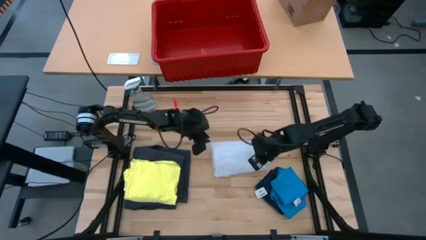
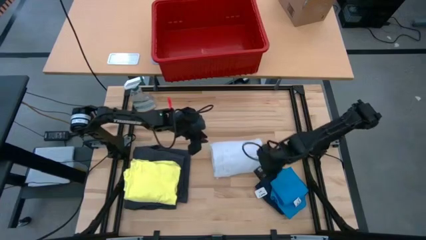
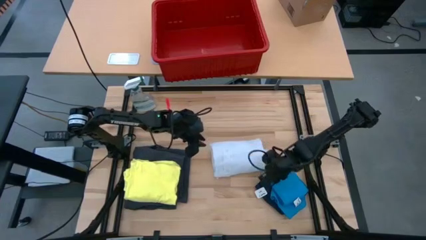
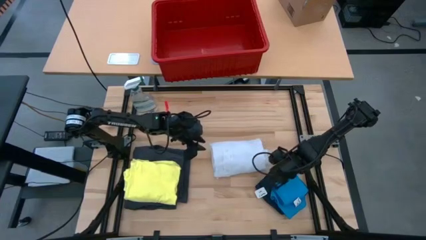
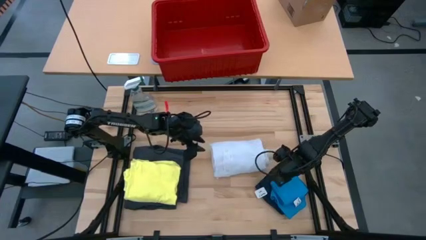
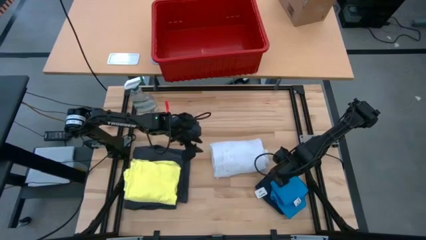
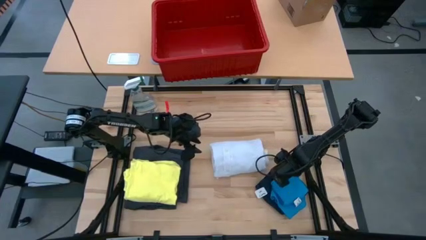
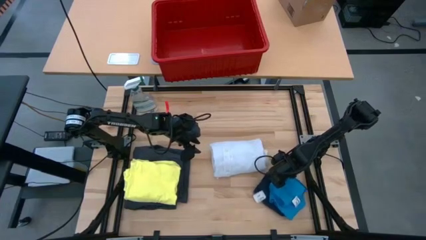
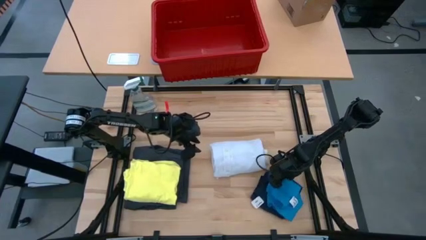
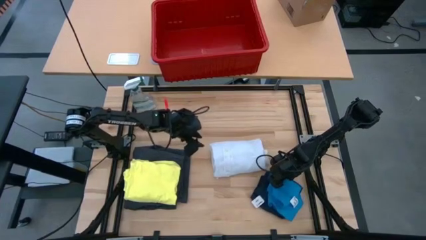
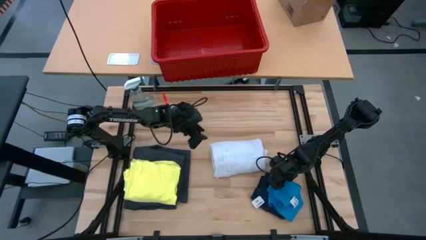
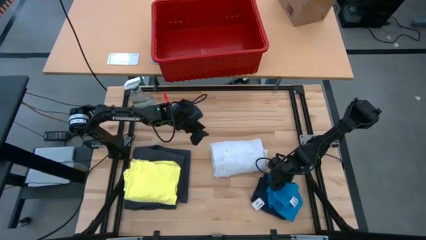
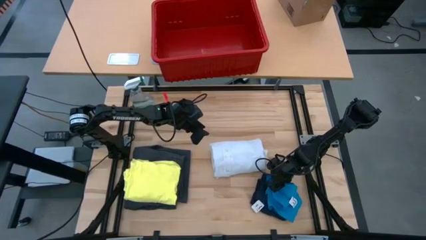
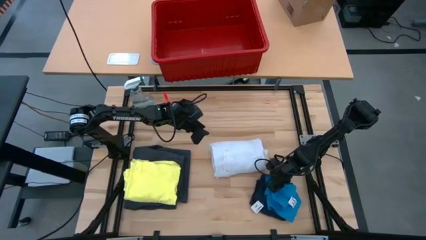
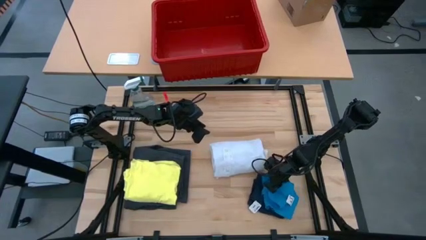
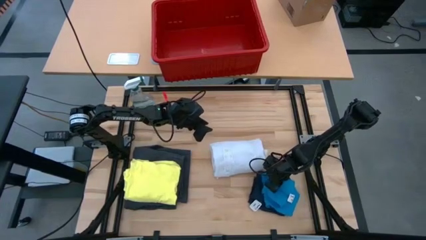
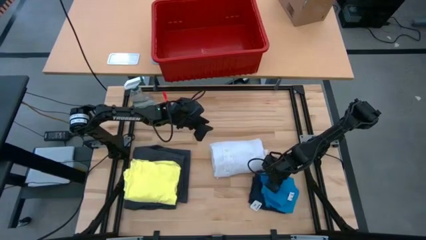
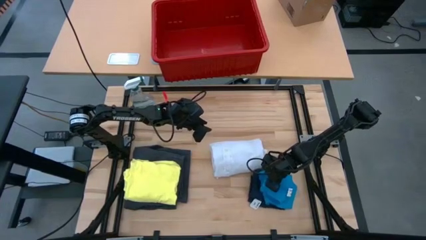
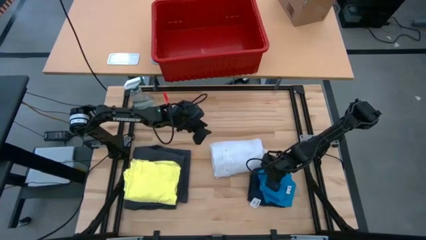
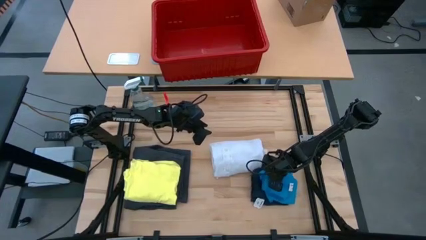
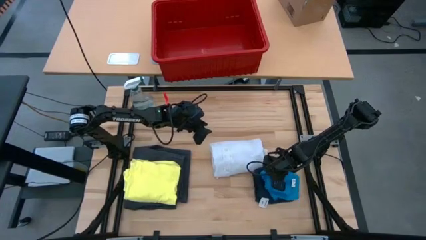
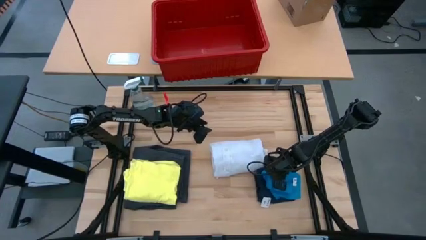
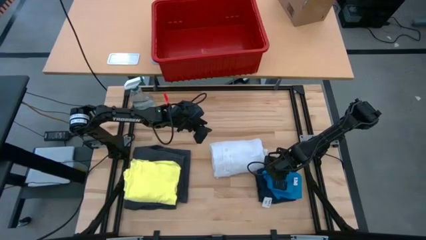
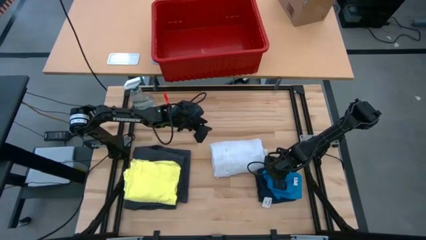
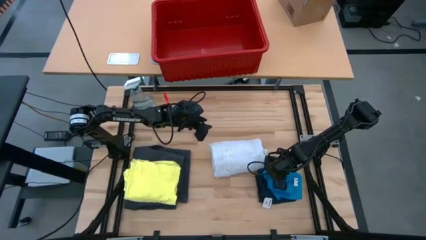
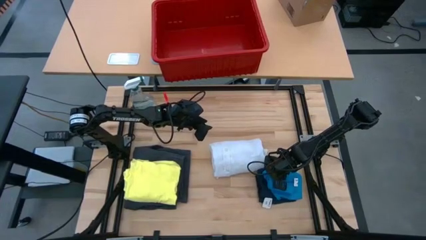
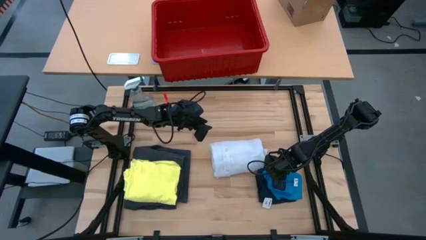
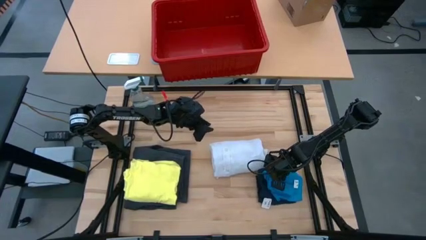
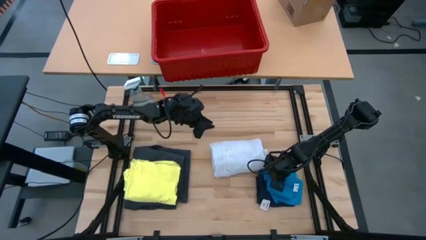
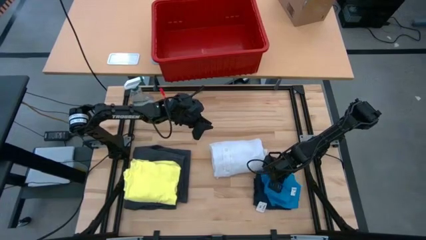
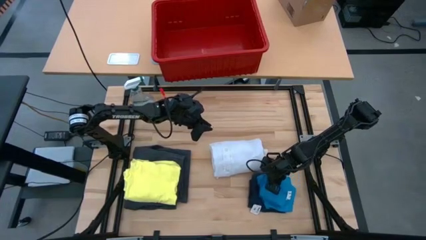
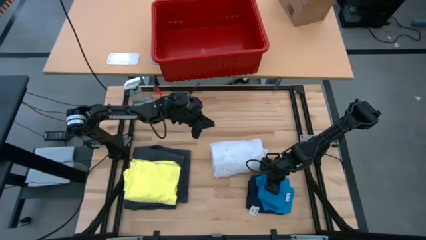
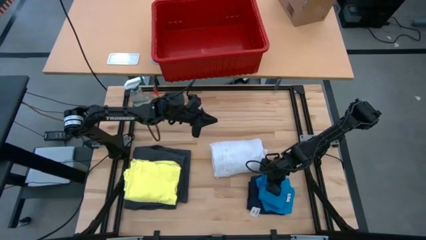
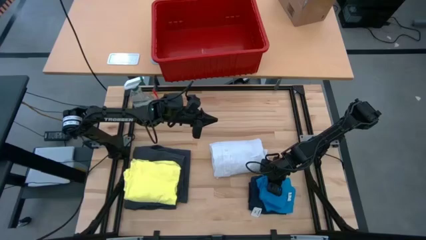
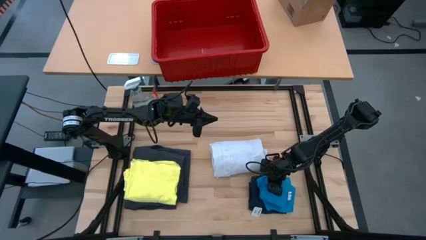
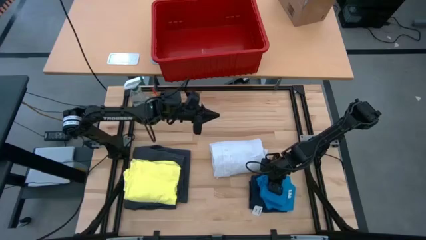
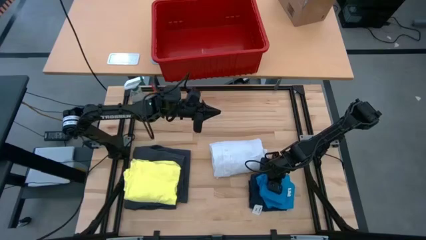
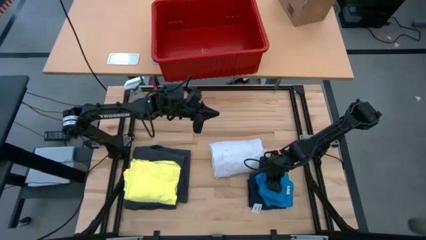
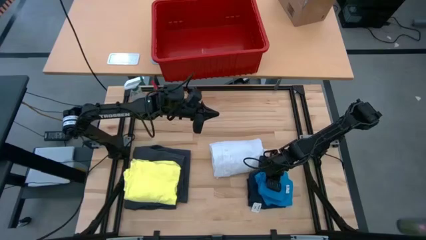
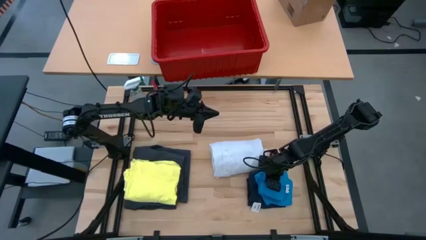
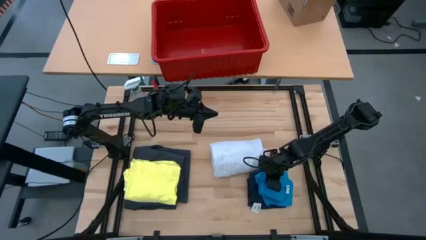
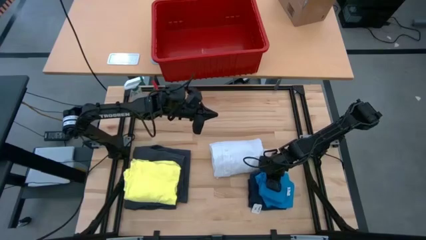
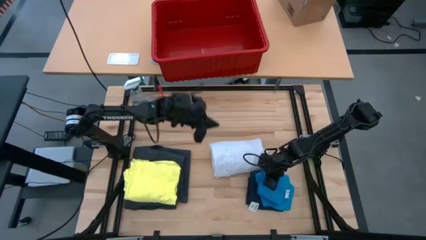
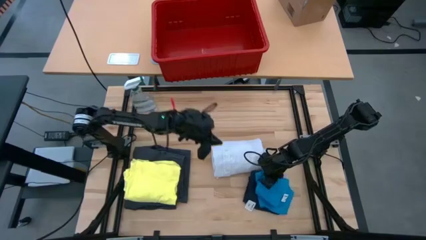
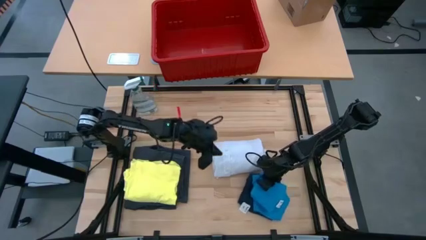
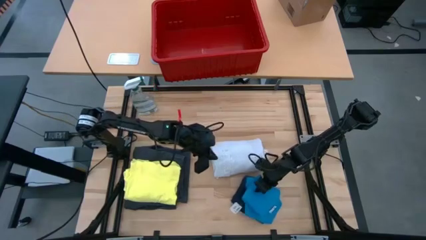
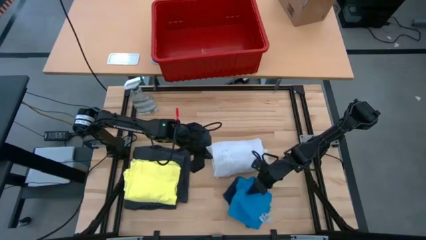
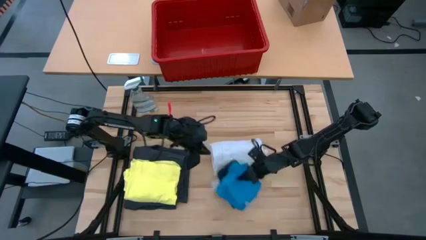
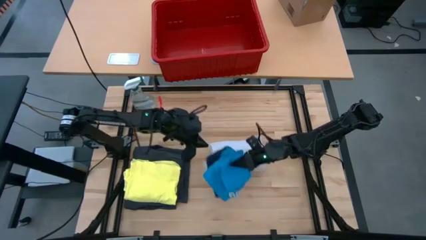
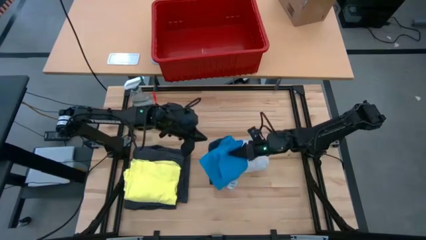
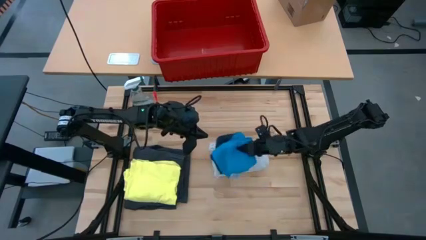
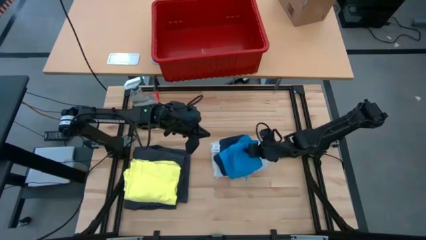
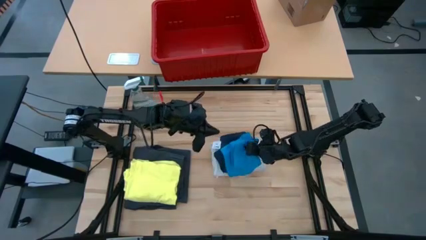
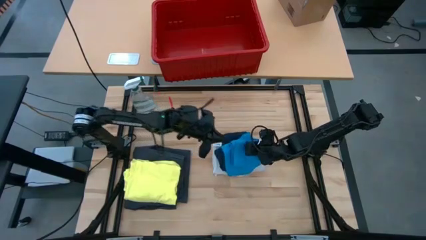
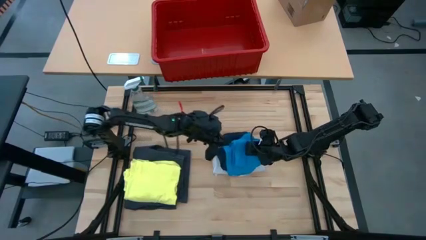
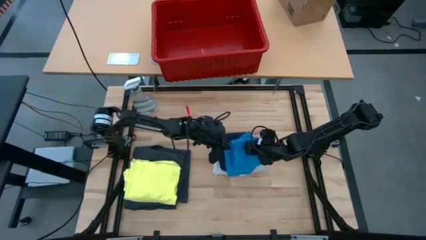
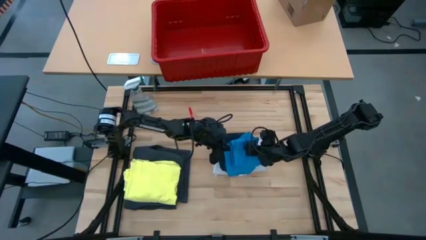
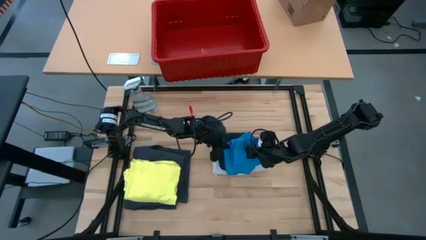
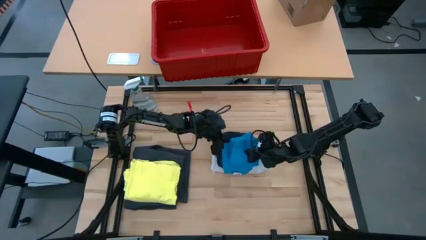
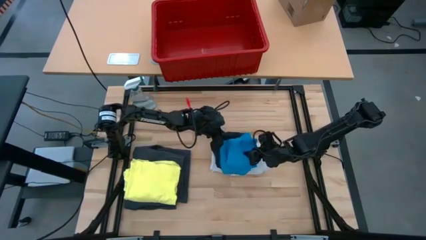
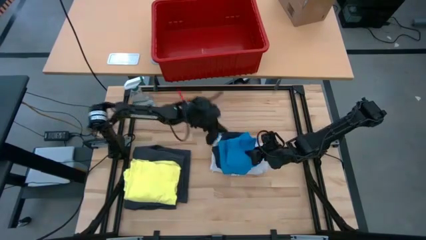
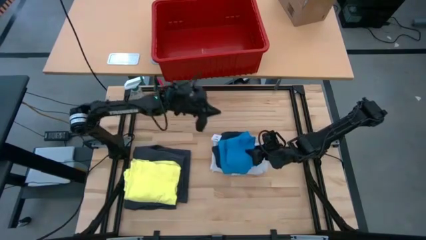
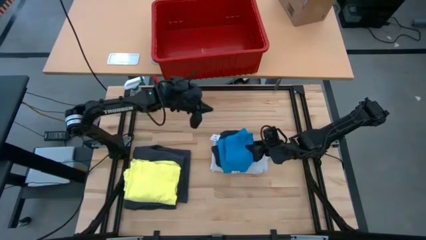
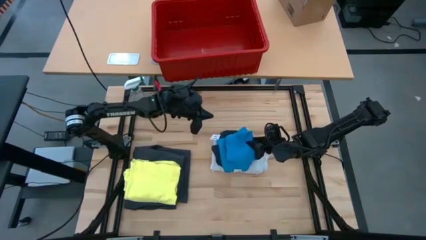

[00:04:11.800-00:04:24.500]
Task: Fold Laundry from Bin
Stack the white shirt on top of the stacked shorts

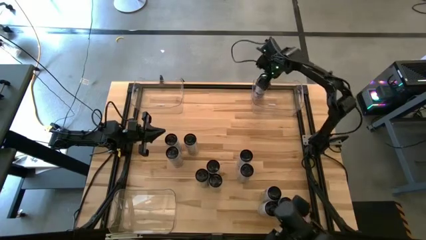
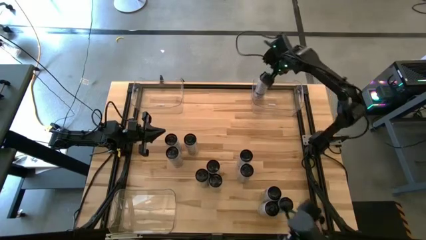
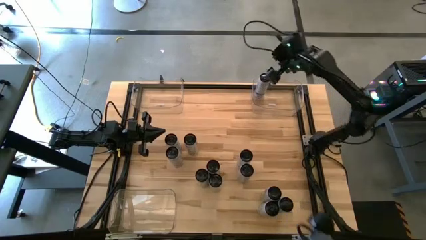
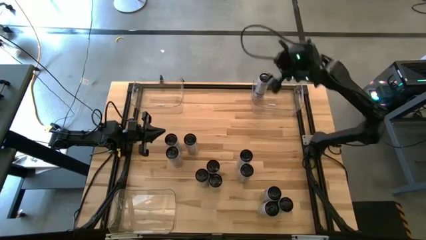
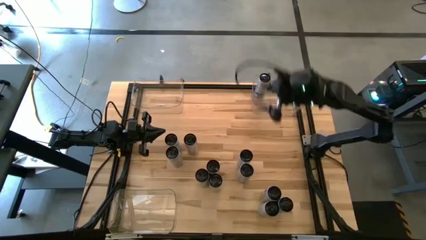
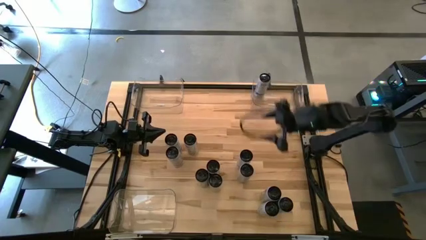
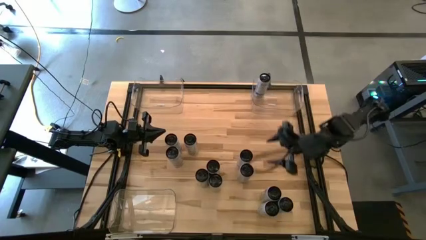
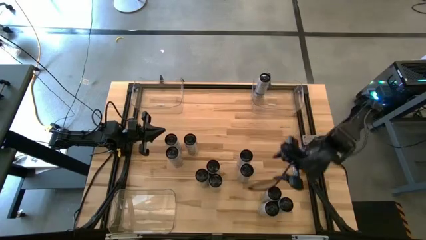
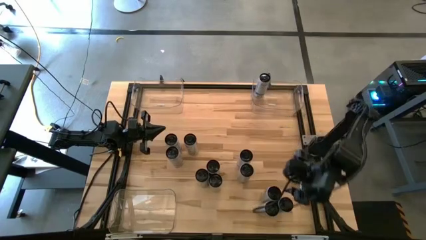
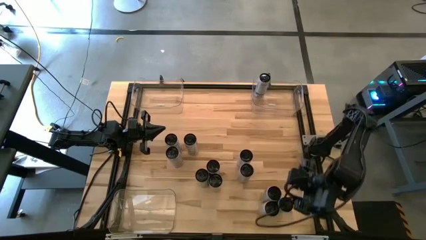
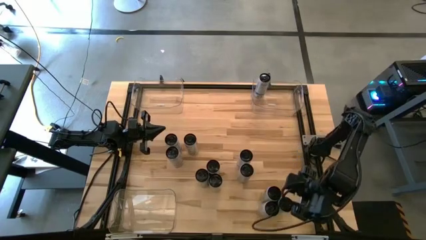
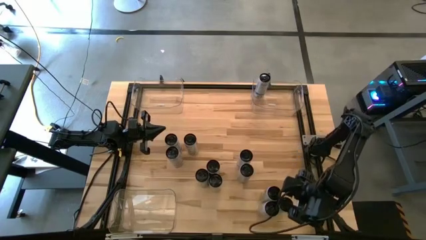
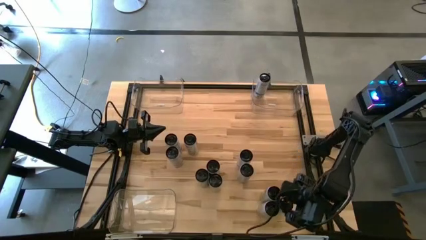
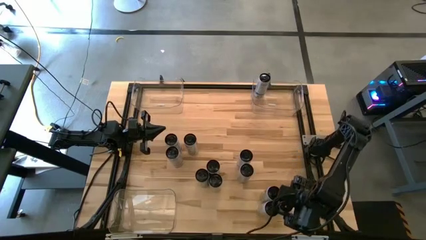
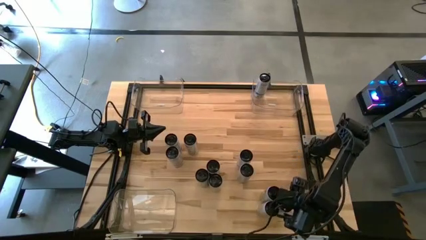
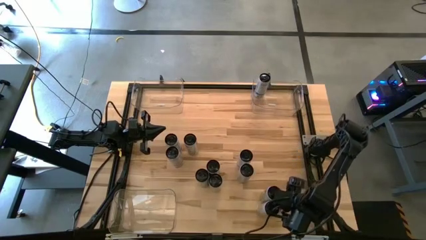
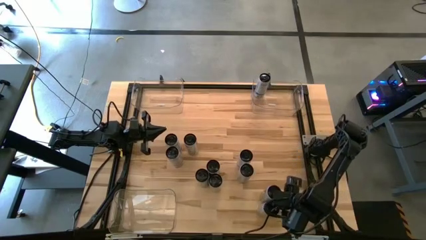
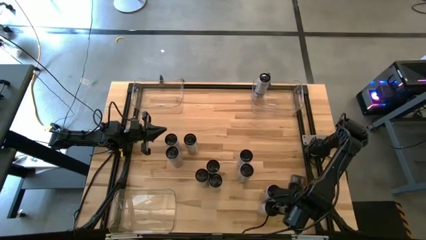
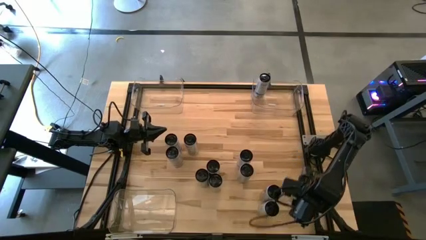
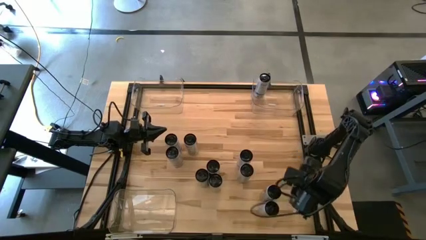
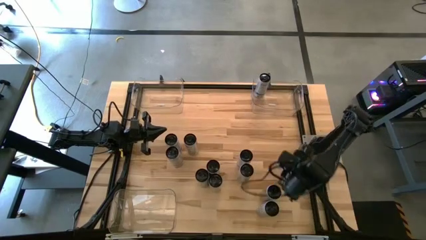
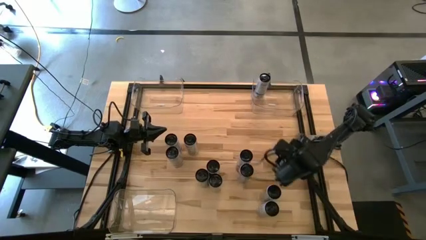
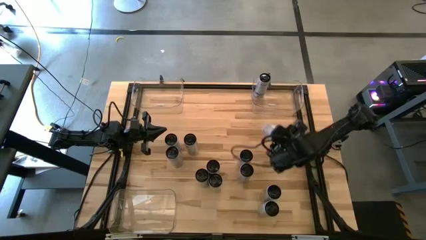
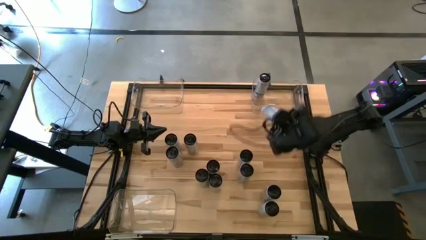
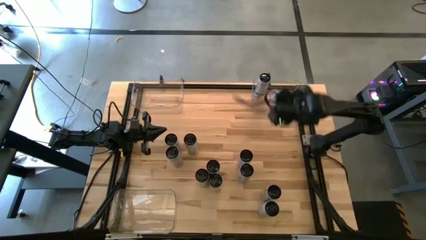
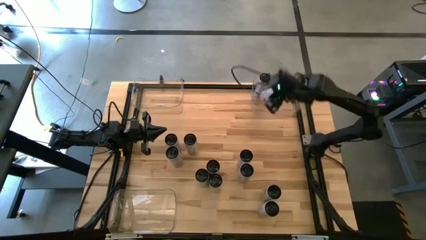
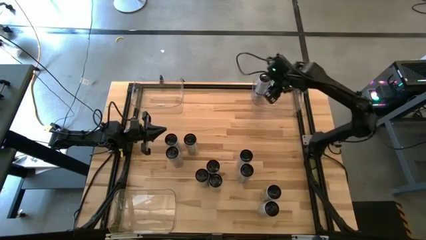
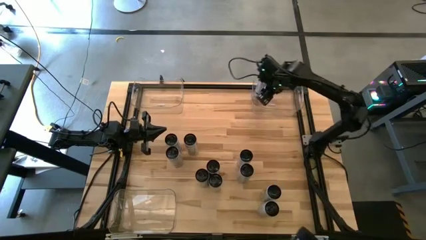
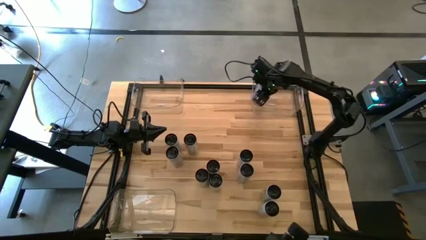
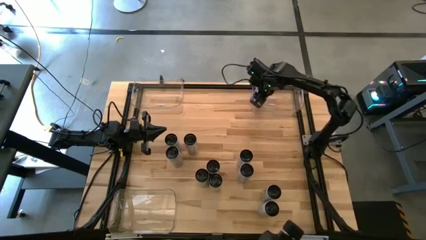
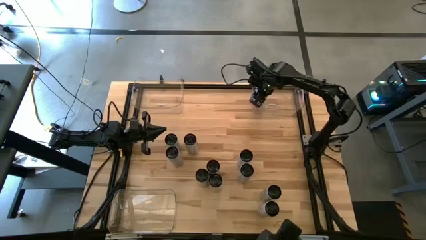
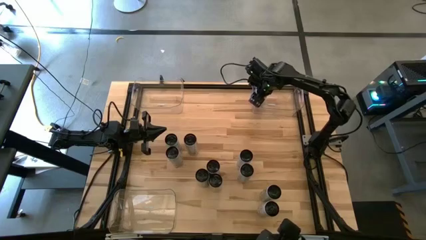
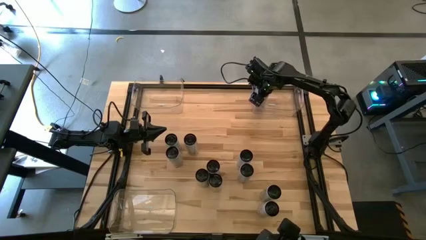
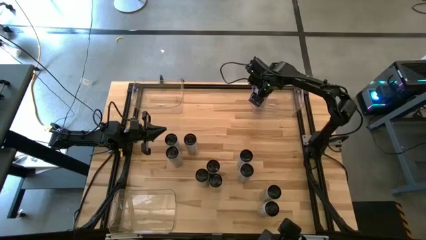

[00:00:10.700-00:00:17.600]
Task: Sort soda cans
Put the white-blue soda can into the top right transparent bin
